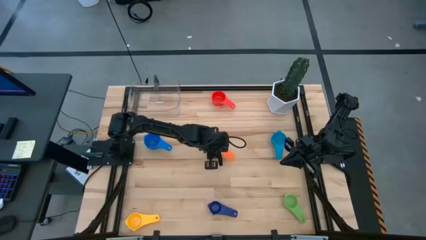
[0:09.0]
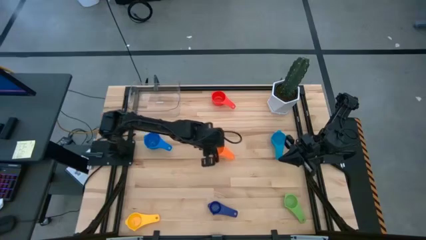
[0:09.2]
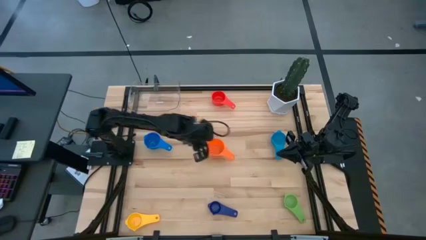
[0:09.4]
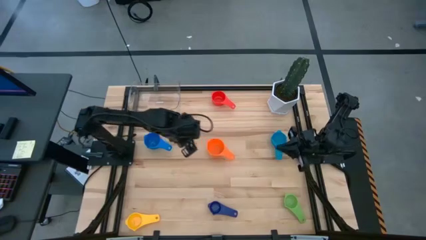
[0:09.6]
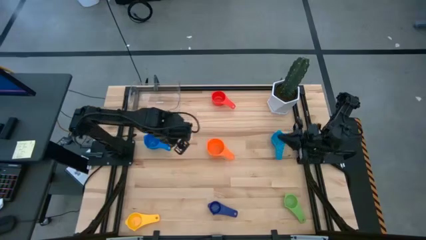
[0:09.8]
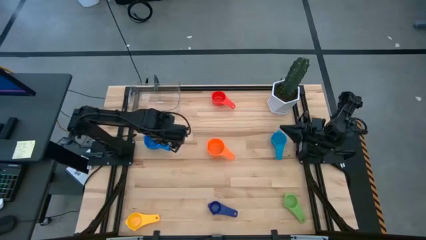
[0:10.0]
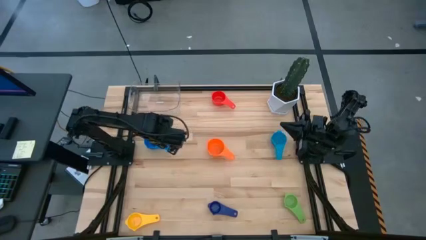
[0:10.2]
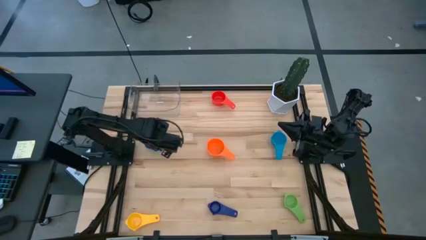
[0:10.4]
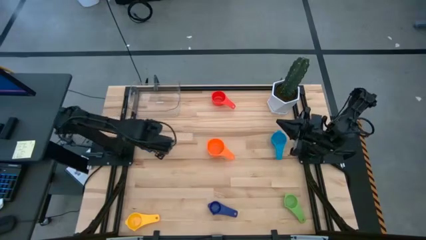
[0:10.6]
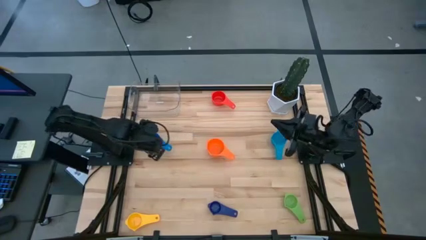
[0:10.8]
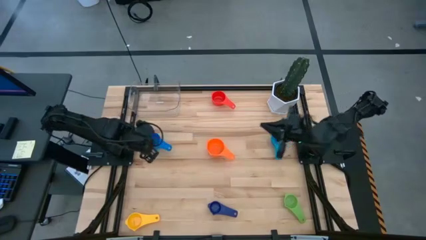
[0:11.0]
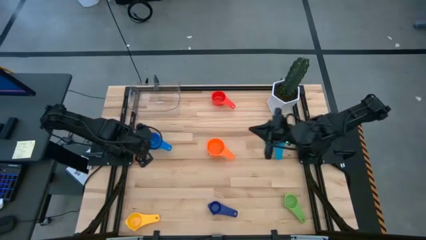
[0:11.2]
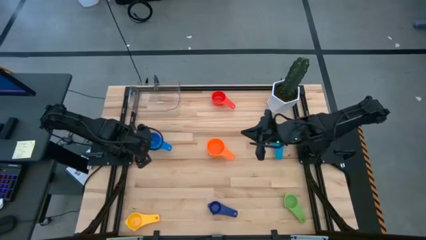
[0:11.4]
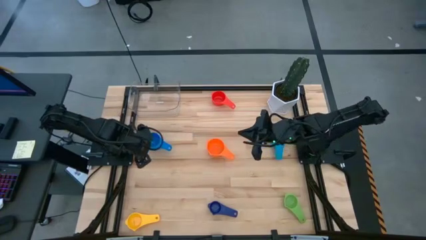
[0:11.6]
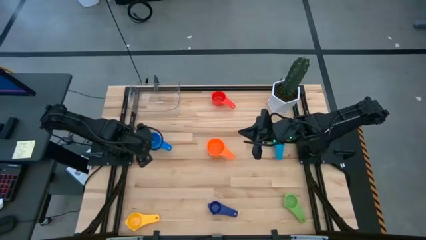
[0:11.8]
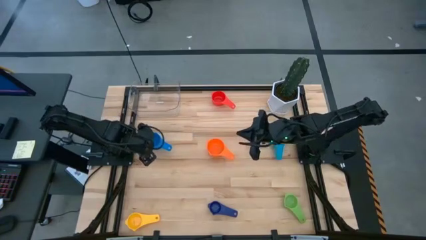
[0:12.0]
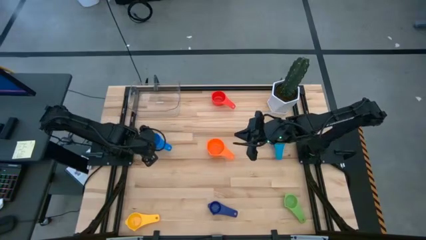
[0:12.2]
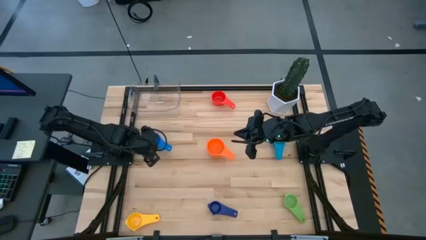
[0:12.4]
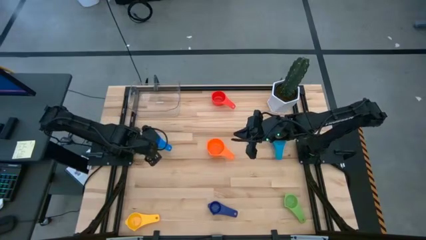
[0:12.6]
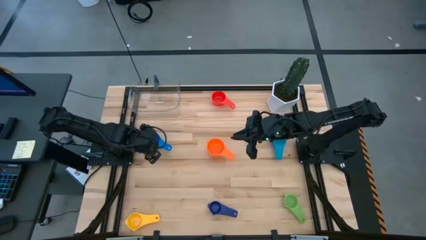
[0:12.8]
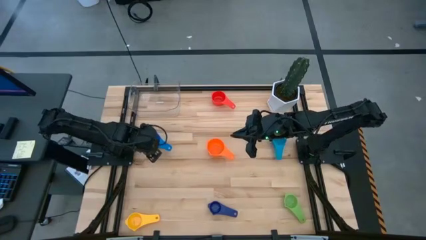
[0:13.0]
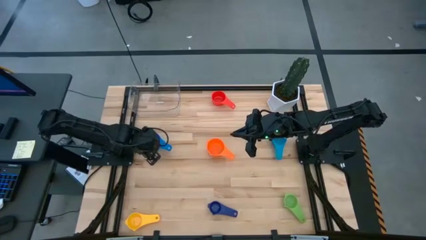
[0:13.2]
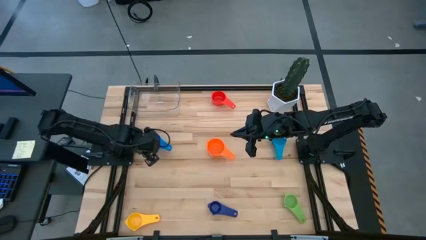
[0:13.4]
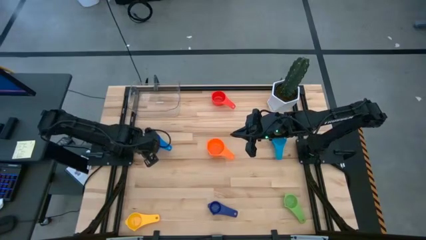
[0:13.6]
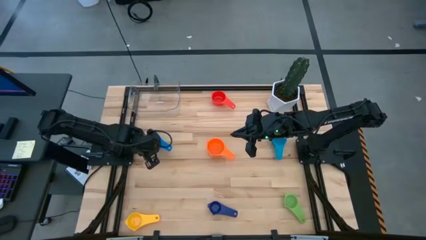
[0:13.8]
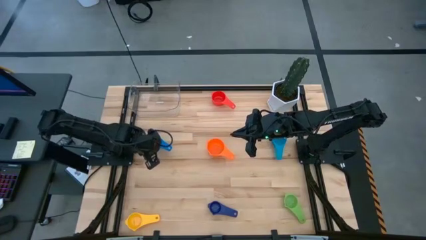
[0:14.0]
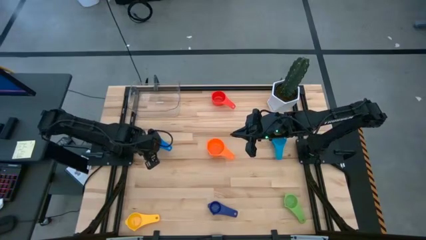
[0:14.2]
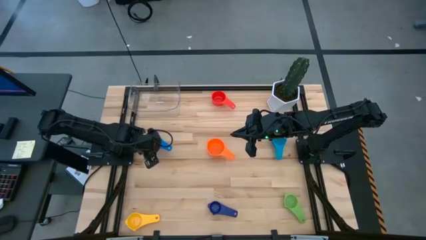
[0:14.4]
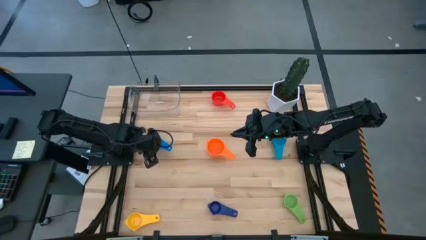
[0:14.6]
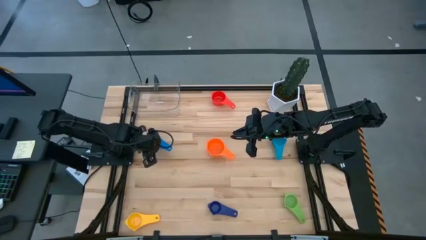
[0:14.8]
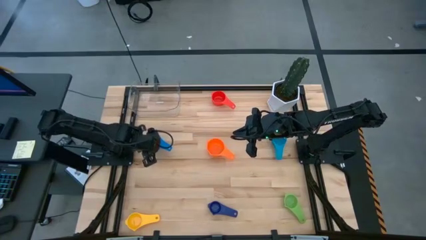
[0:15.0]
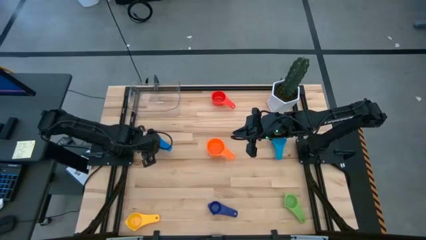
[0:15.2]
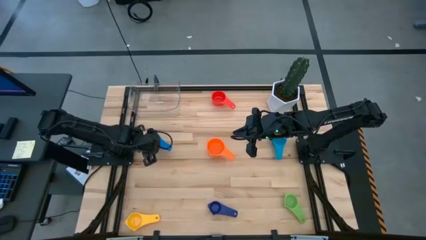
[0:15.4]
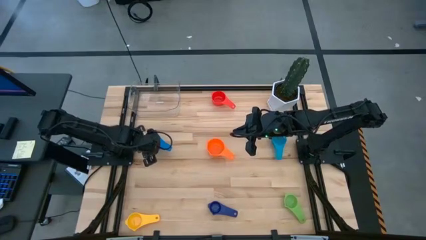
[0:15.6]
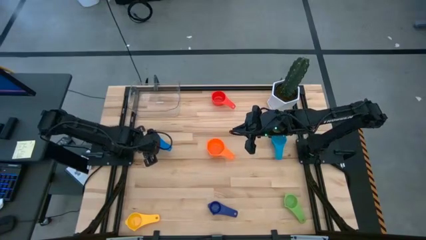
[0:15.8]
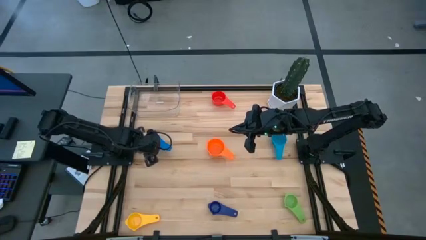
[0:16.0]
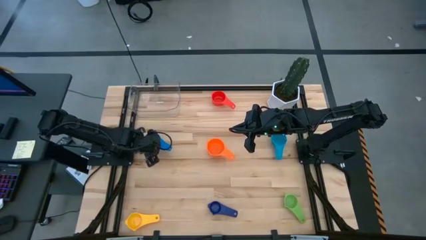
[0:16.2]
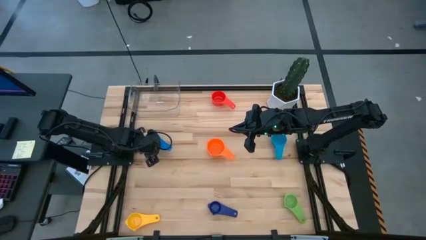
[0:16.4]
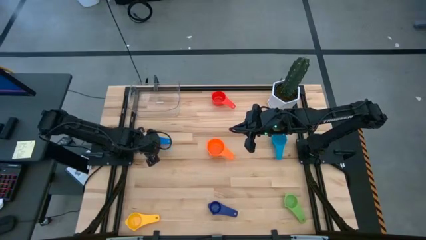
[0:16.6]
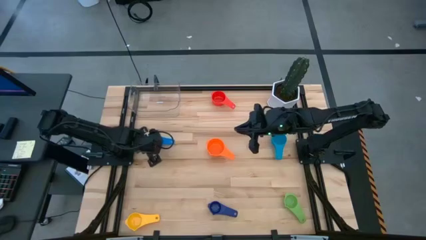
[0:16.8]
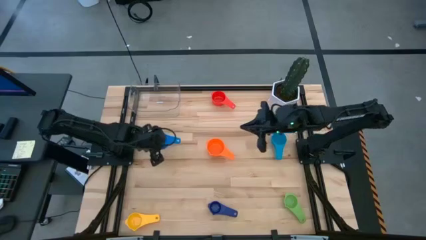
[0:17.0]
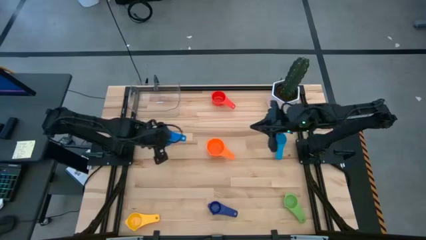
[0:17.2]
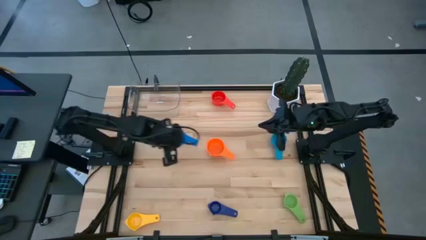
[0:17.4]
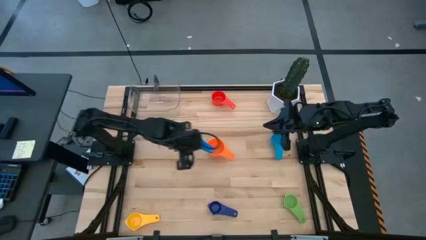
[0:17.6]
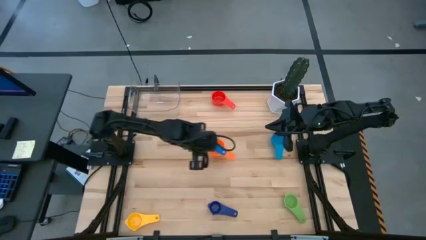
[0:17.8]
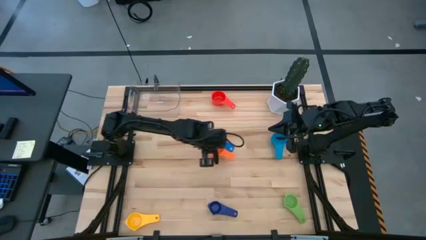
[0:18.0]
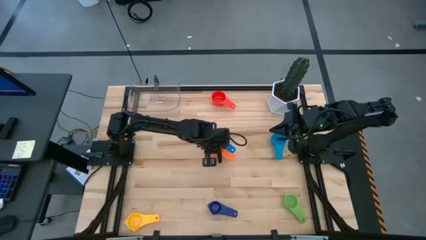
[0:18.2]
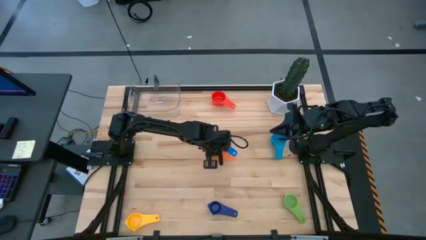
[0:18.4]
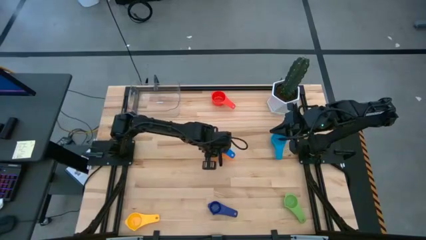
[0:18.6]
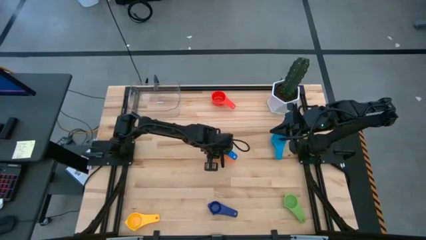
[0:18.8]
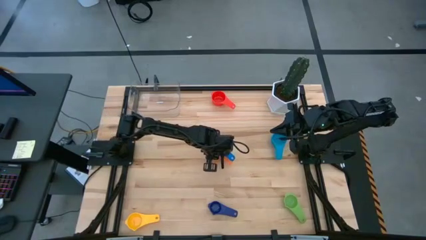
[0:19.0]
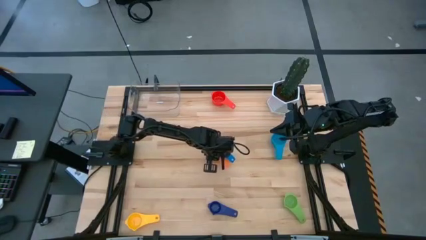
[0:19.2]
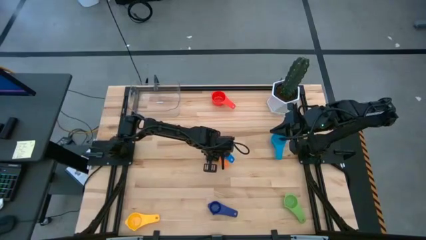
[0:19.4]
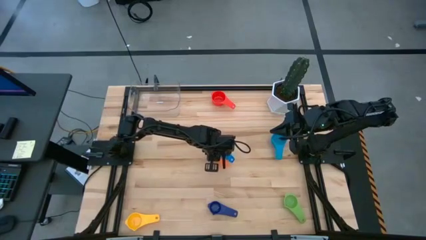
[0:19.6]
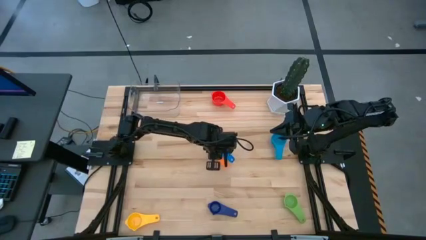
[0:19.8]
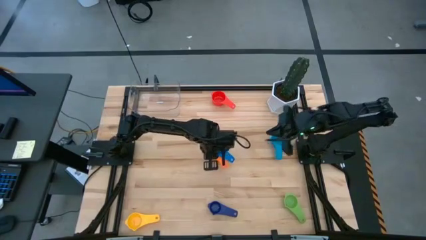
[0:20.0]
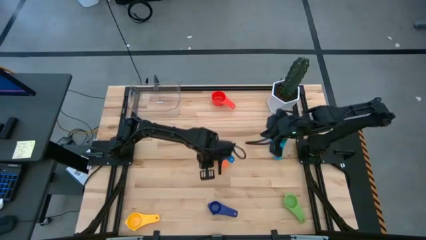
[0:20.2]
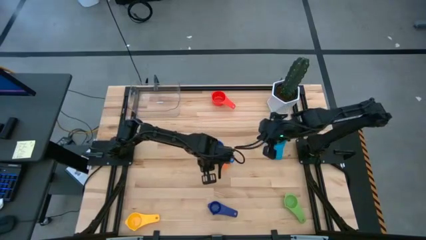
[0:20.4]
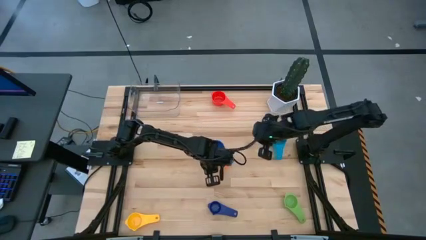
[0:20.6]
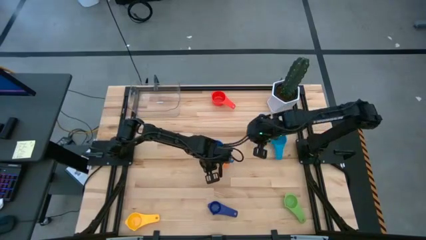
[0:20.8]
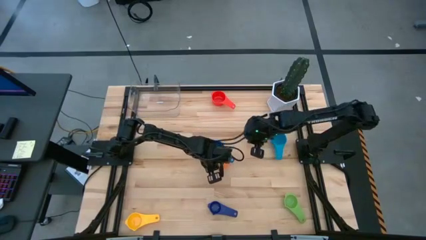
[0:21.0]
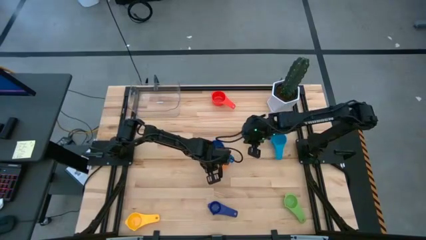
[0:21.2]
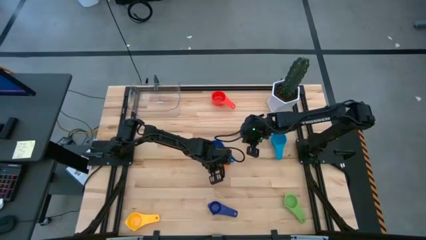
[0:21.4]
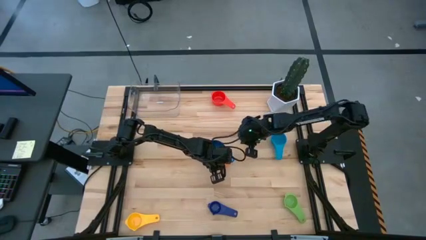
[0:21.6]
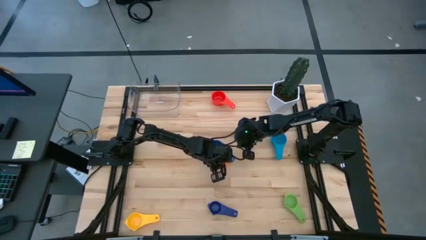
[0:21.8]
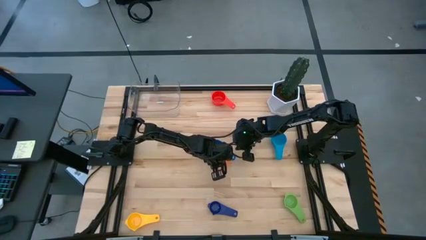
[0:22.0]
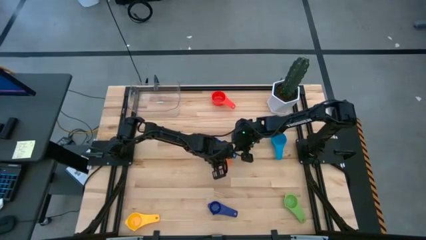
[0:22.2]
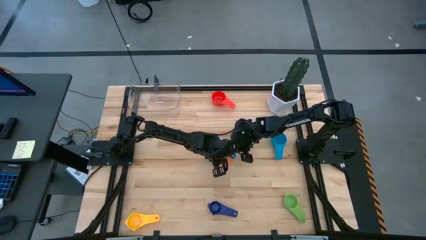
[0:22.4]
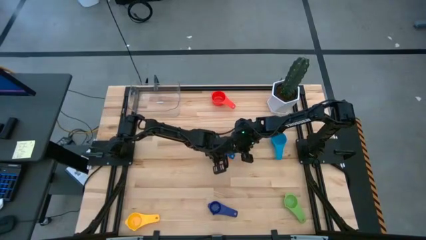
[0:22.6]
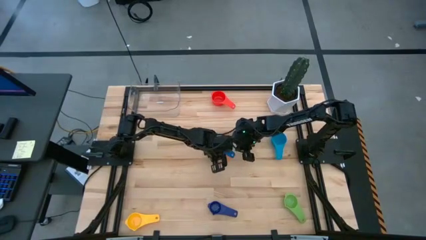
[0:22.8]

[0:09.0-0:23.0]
Task: Nest measuring cups in basket
Stack the blue nest measuring cup on top of the orange nest measuring cup
